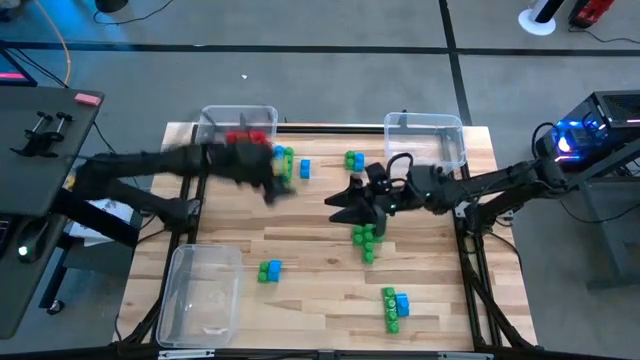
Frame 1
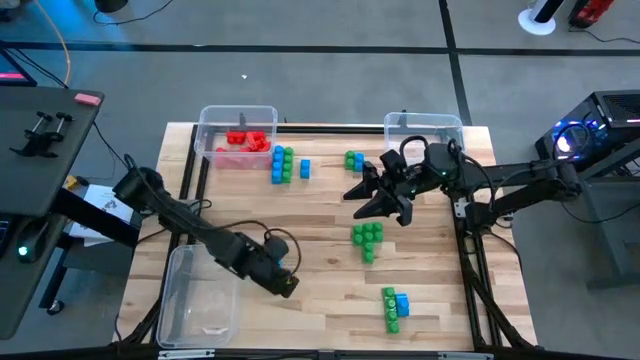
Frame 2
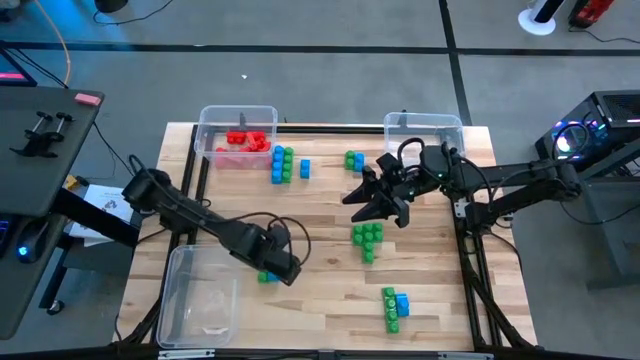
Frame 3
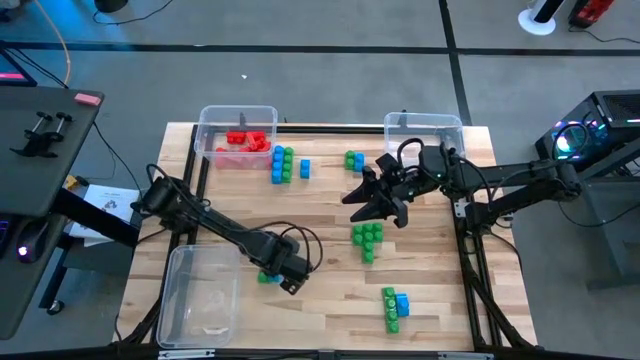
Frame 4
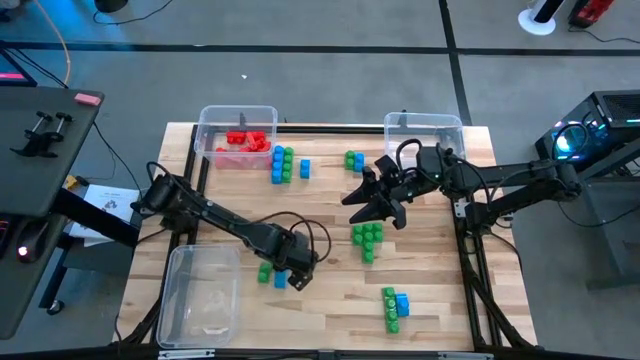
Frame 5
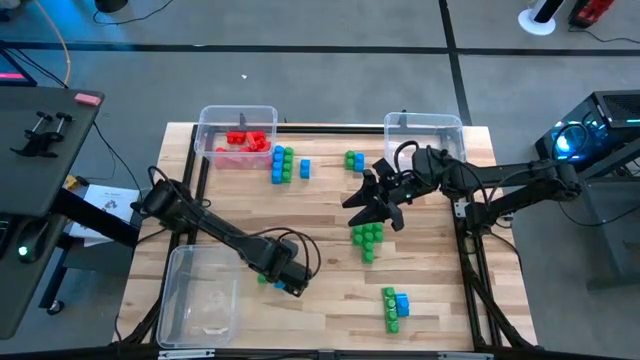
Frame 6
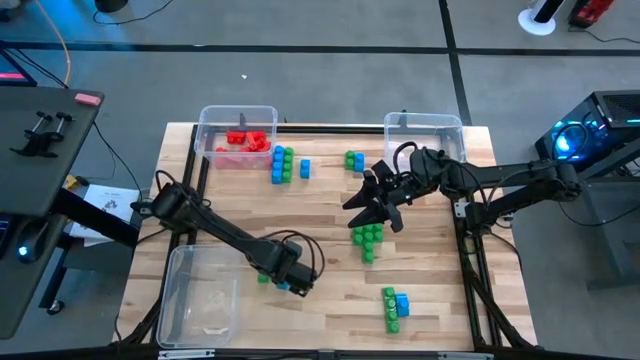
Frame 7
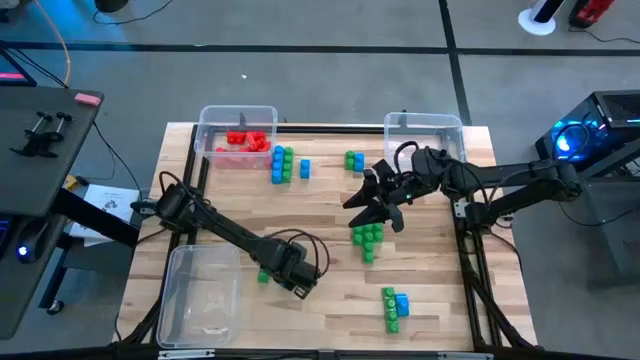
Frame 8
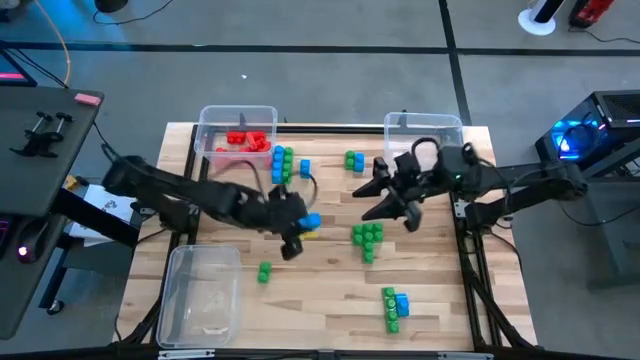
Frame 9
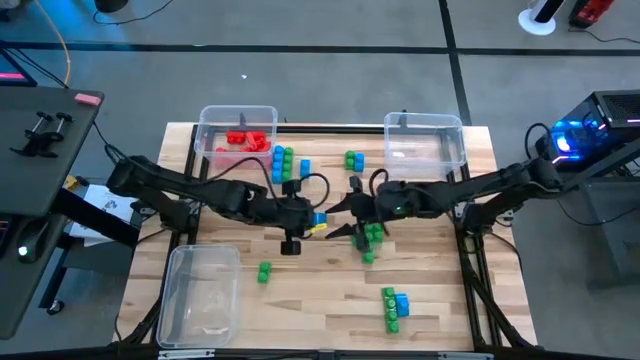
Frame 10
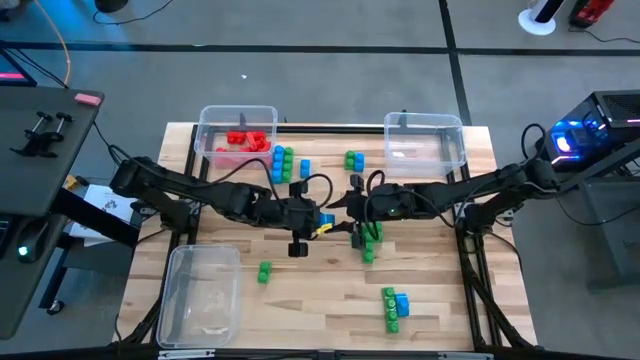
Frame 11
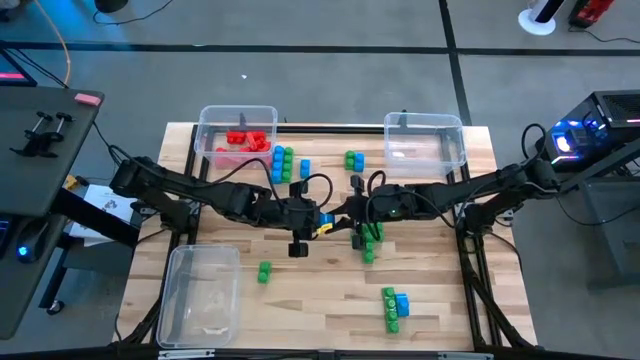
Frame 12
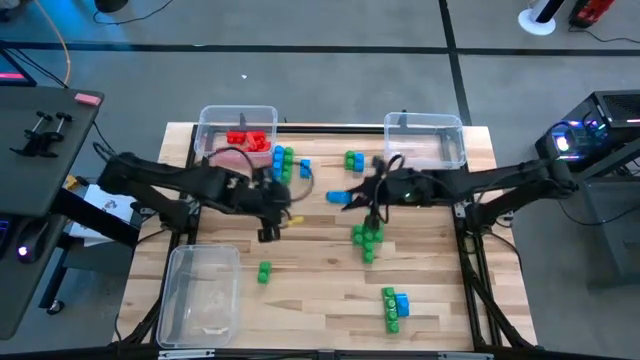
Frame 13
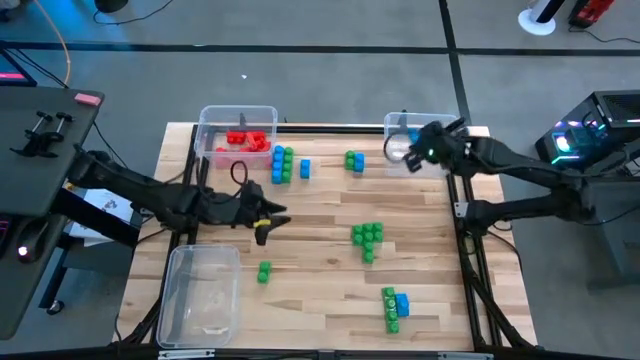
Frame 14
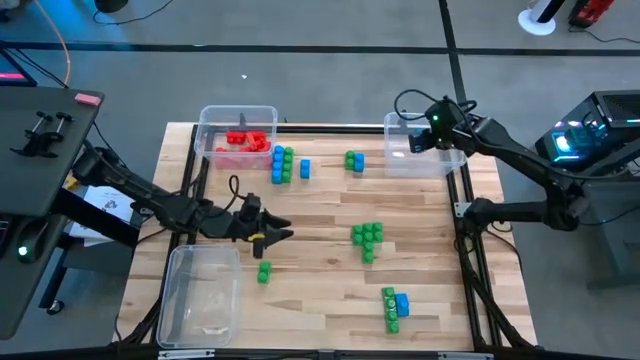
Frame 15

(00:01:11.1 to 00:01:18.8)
Task: Sort blocks
Put the blue game piece into the top right transparent bin

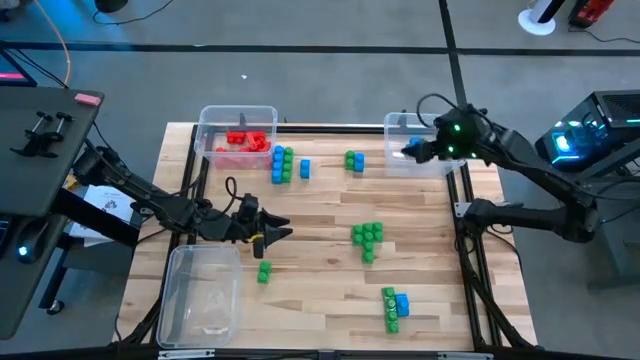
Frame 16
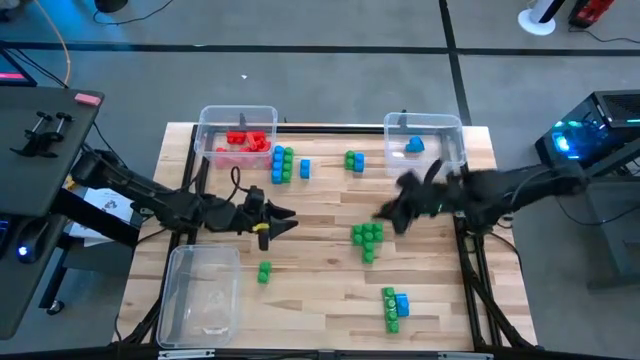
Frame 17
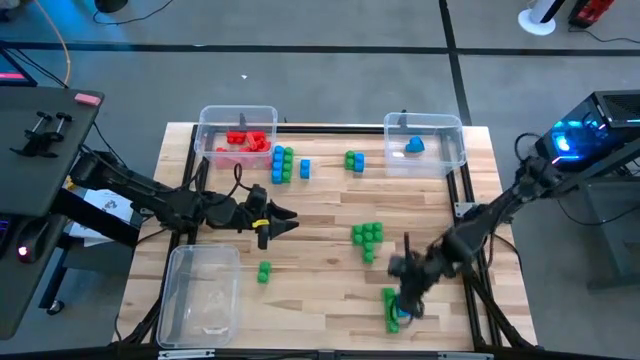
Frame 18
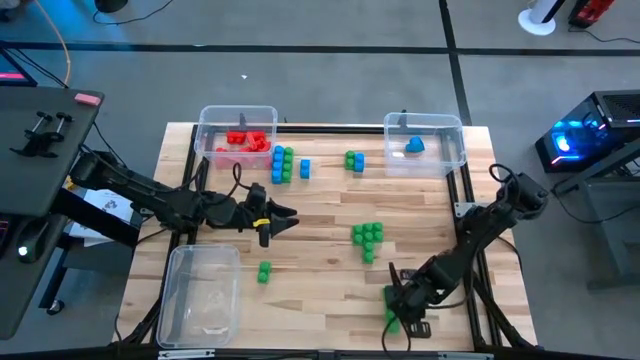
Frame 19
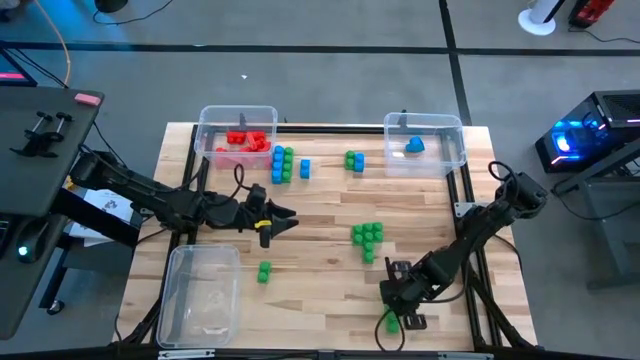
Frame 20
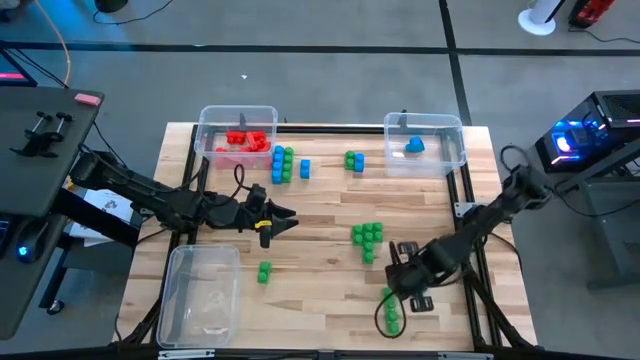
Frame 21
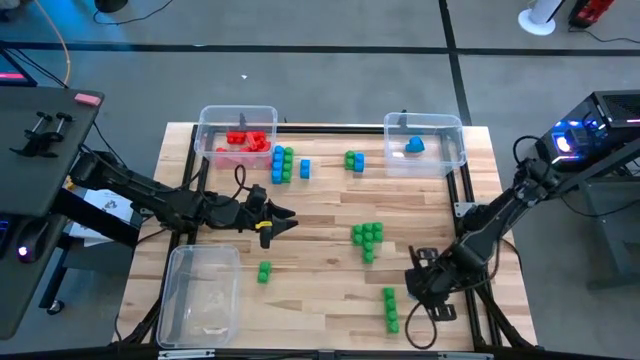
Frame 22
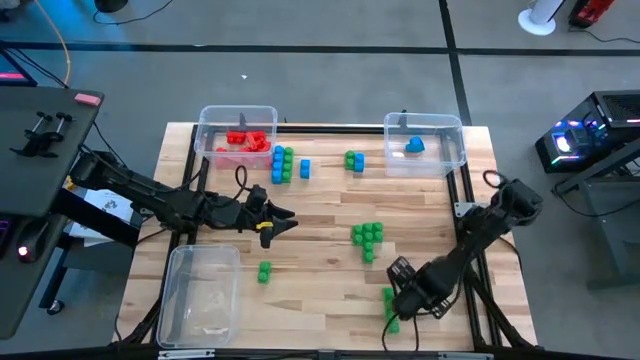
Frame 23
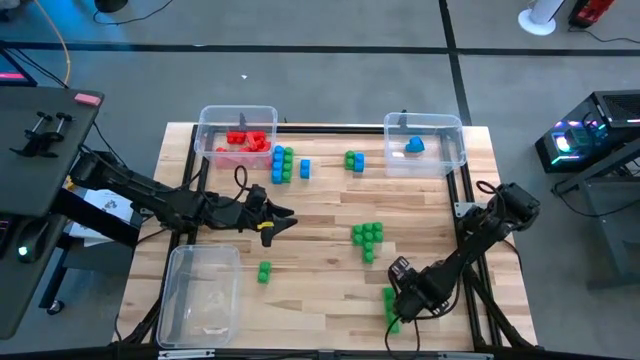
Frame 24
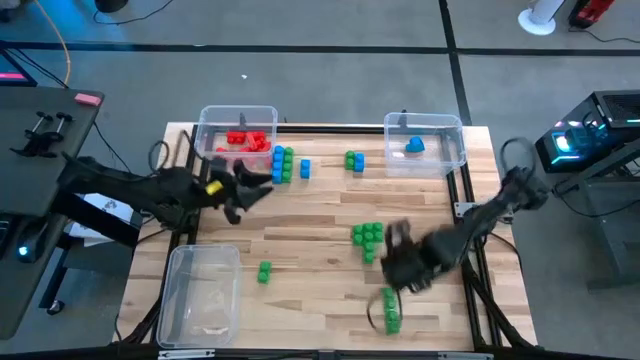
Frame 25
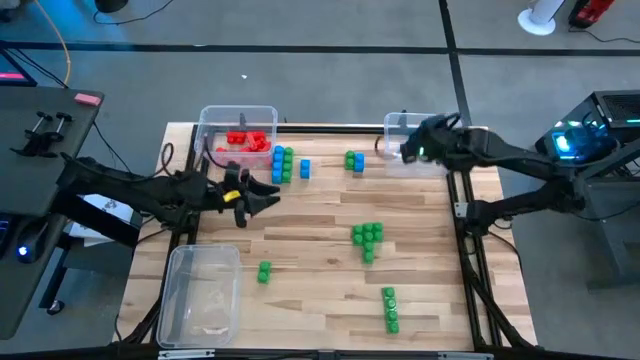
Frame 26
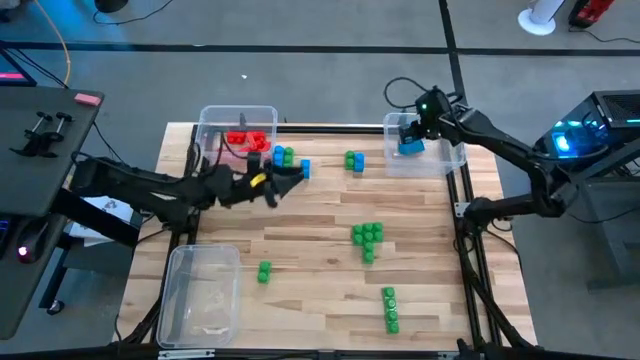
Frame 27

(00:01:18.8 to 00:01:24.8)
Put the blue game piece into the top right transparent bin

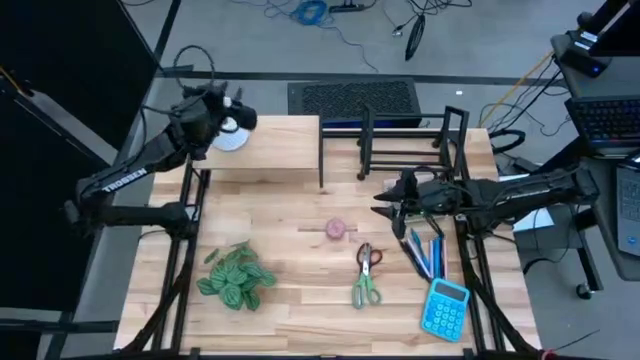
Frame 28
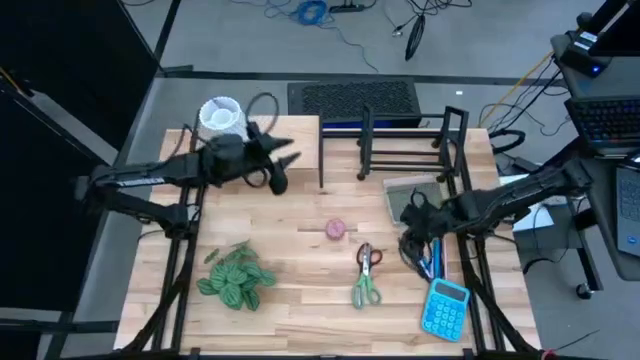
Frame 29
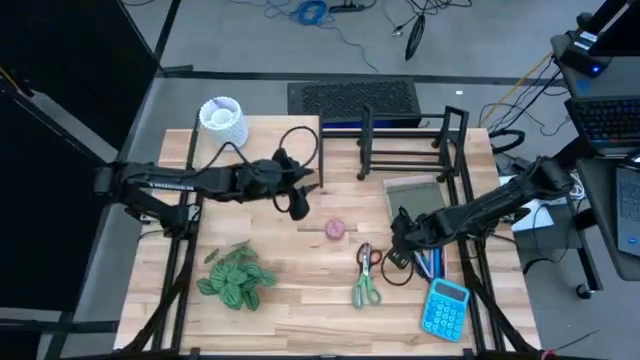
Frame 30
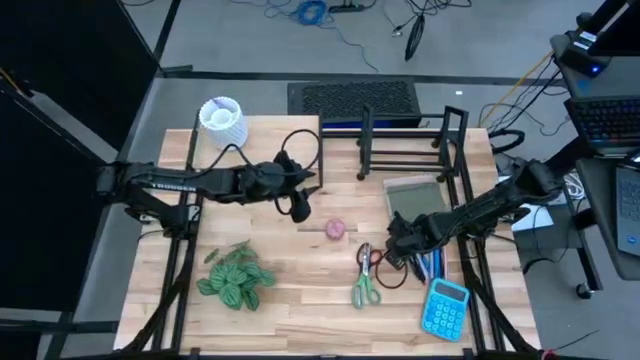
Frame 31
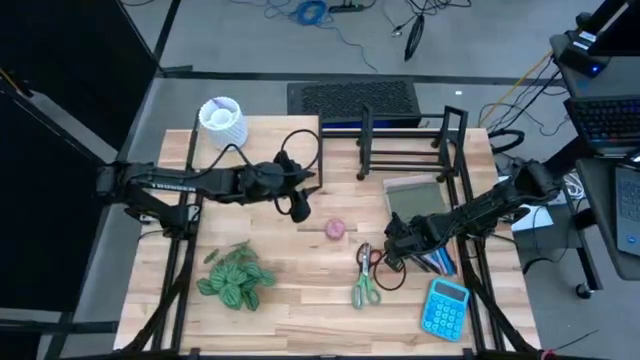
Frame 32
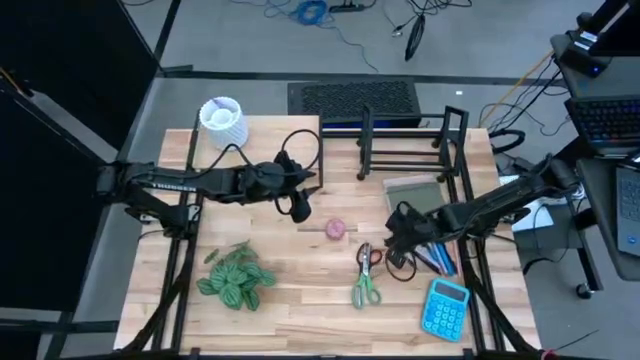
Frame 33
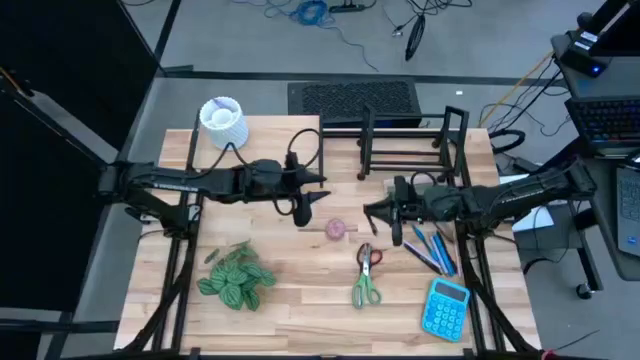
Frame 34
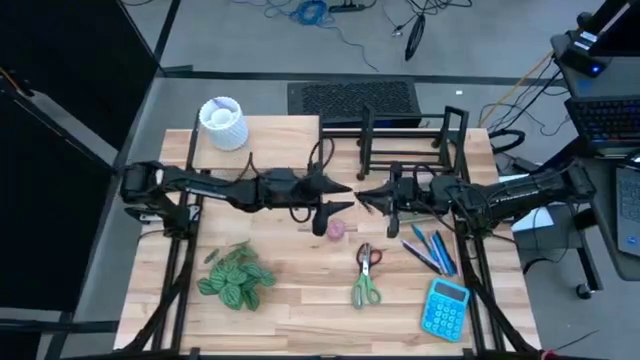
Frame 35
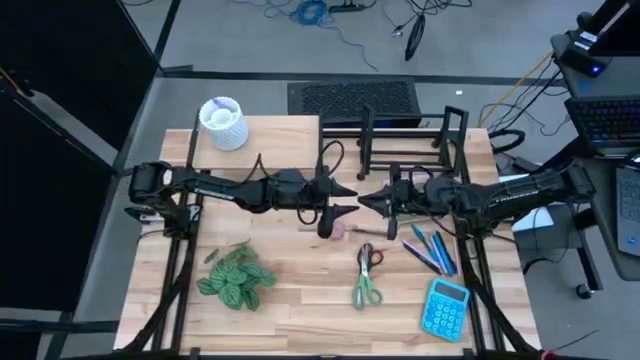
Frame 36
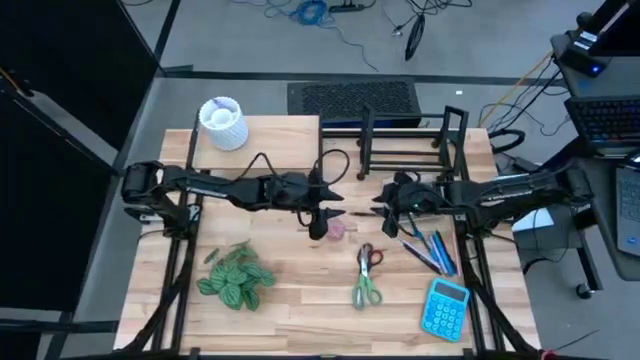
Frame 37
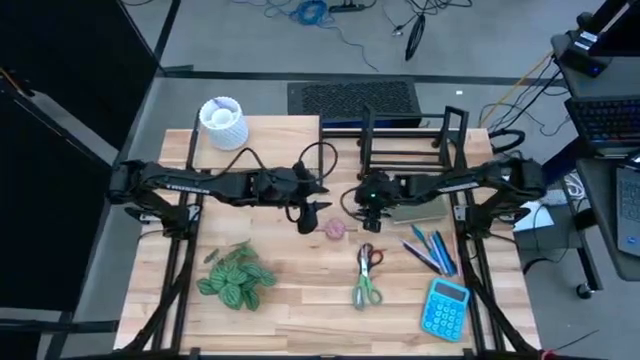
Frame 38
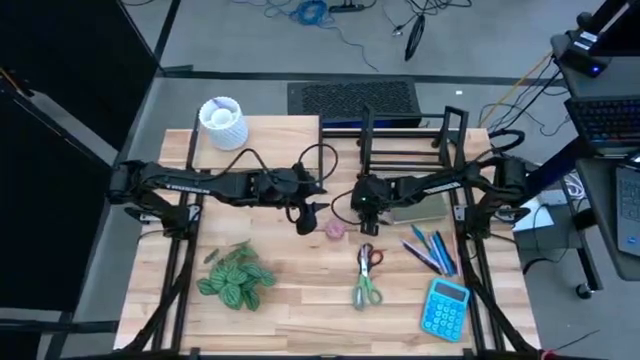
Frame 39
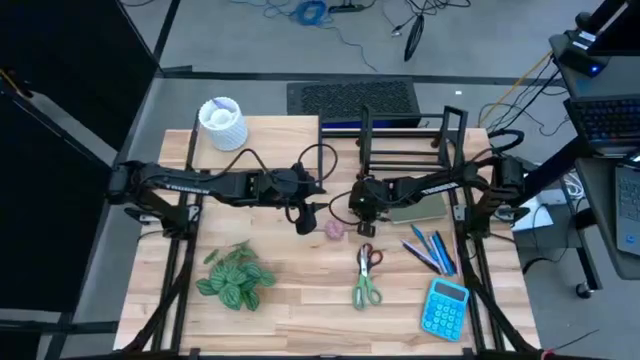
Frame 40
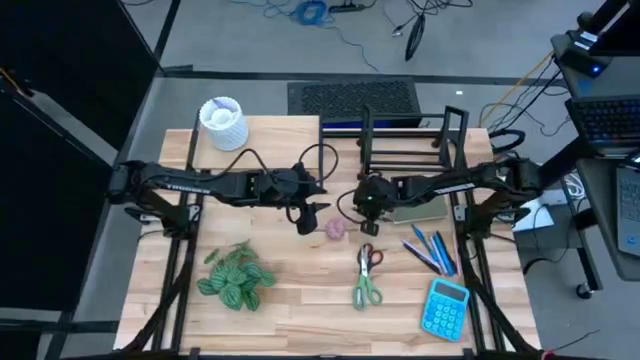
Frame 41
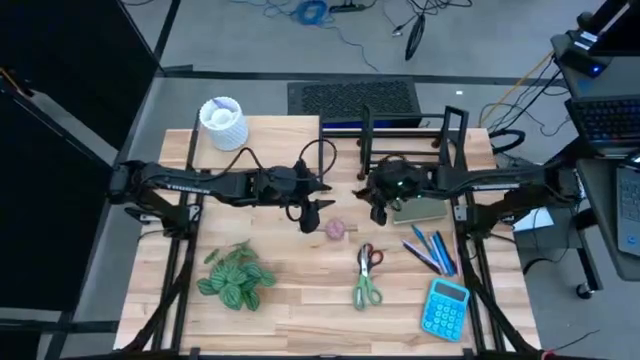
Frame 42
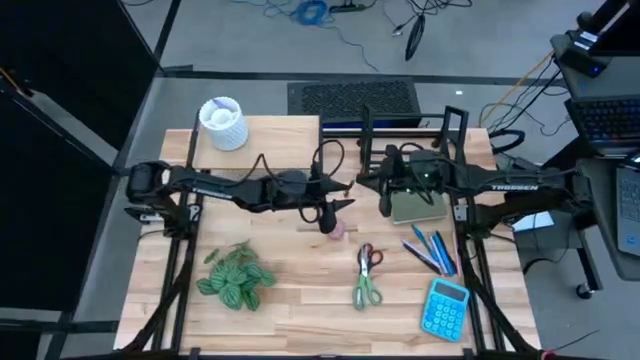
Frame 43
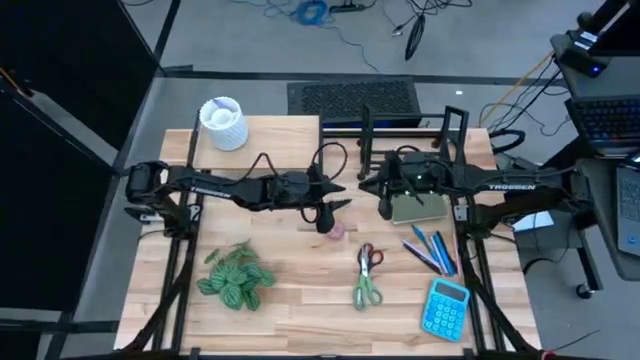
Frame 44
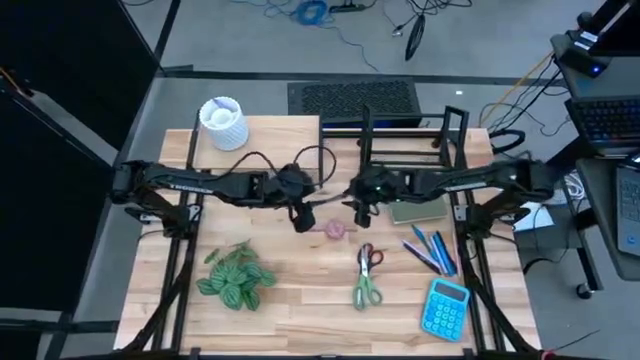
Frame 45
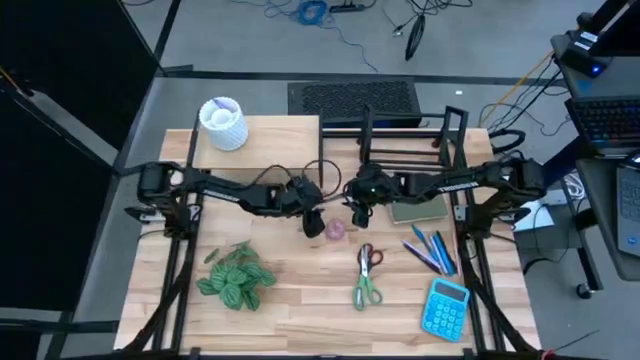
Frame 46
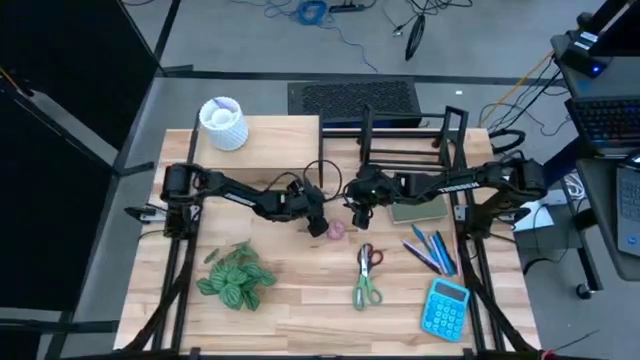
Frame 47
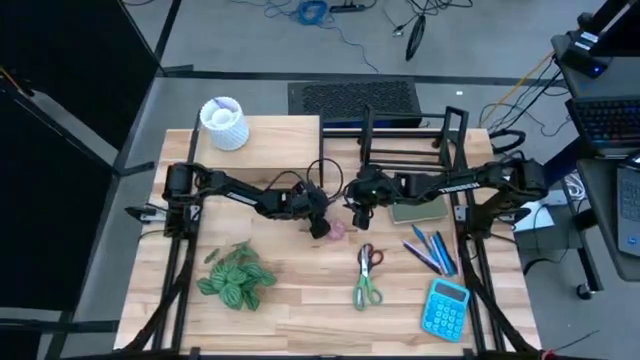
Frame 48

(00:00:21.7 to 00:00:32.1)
Task: Stock shelves
Put the black pen into the white pen holder
